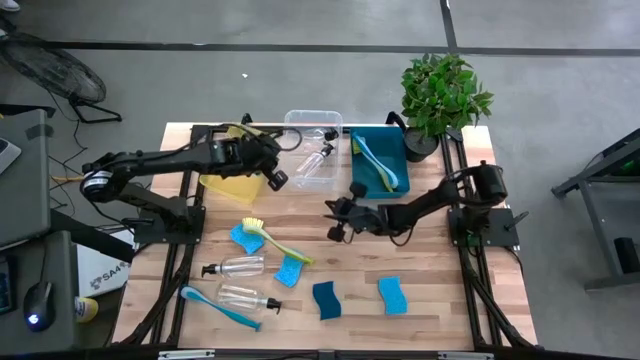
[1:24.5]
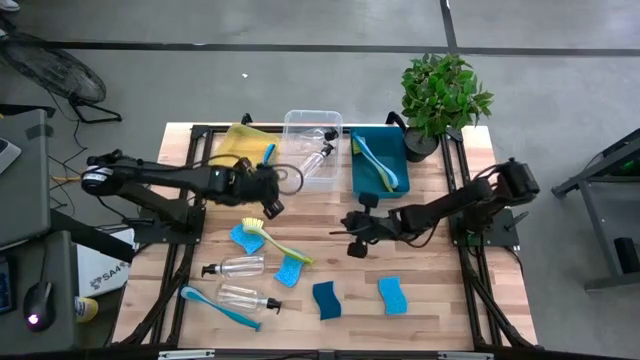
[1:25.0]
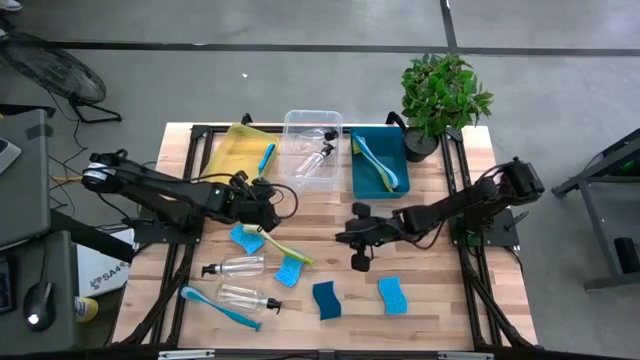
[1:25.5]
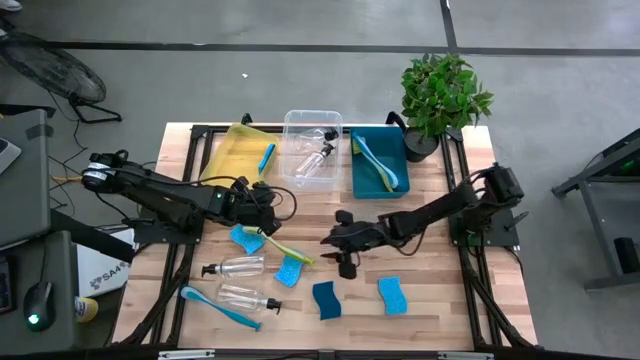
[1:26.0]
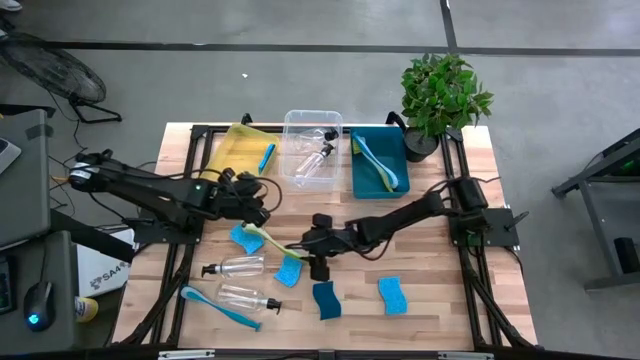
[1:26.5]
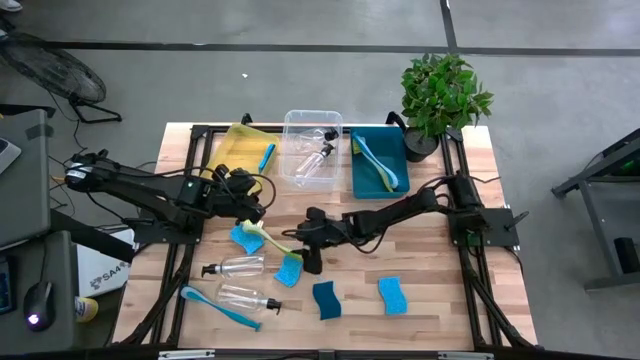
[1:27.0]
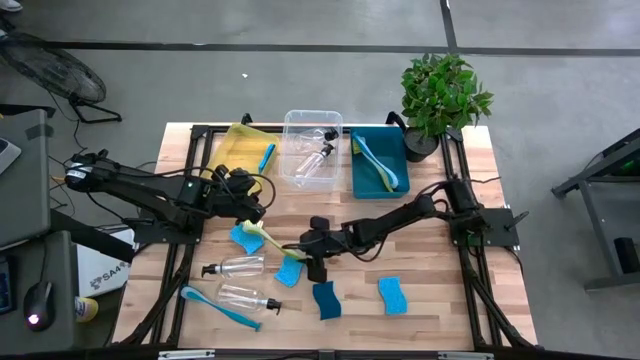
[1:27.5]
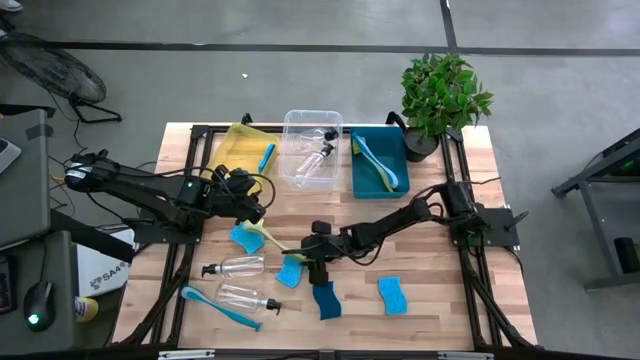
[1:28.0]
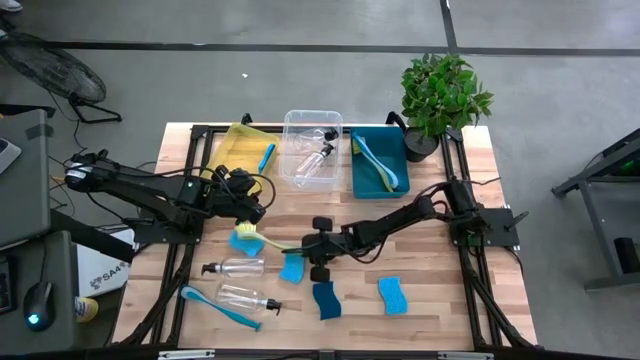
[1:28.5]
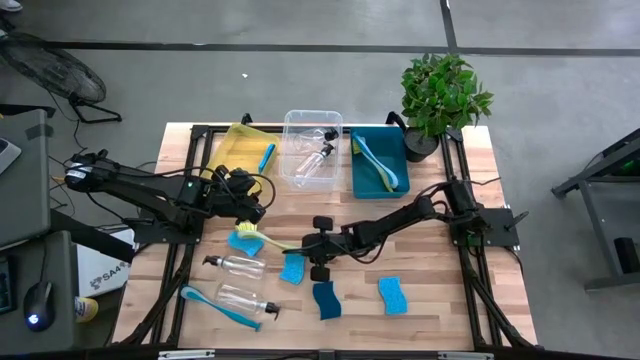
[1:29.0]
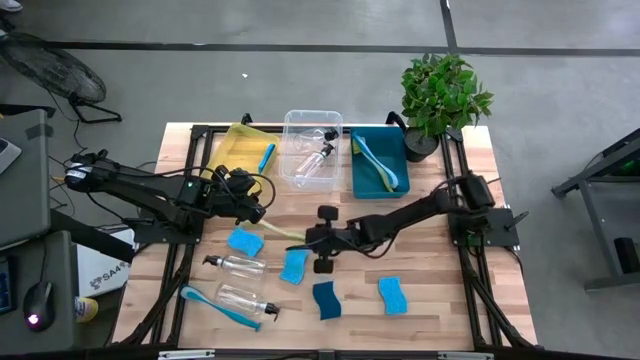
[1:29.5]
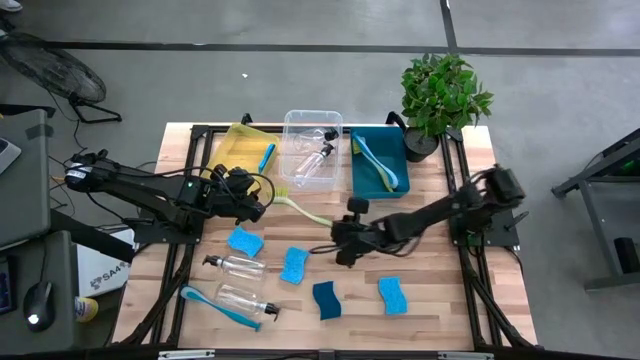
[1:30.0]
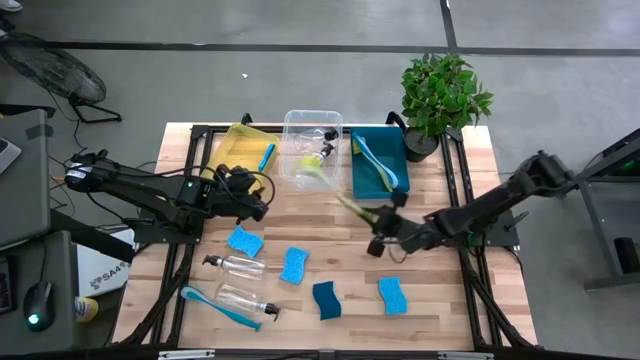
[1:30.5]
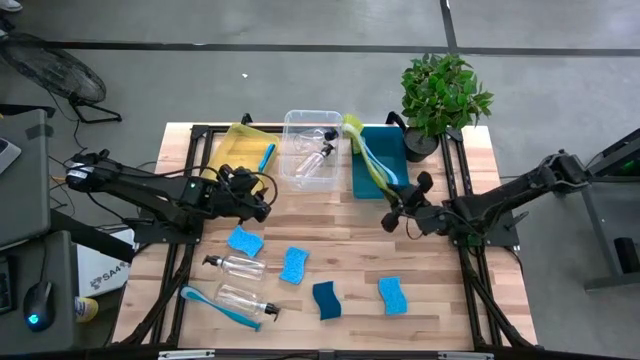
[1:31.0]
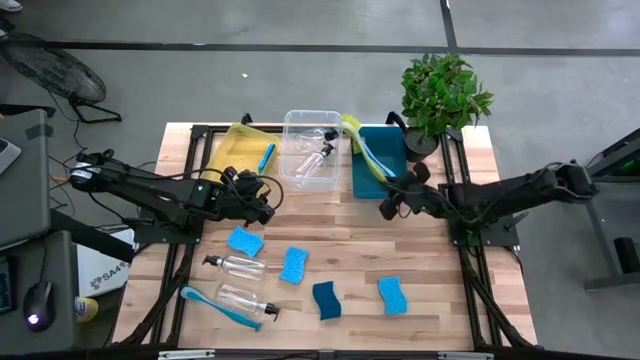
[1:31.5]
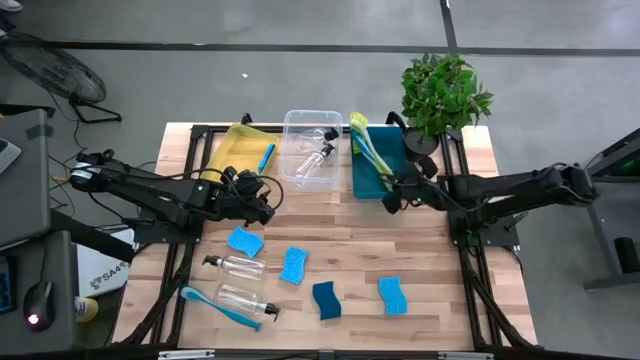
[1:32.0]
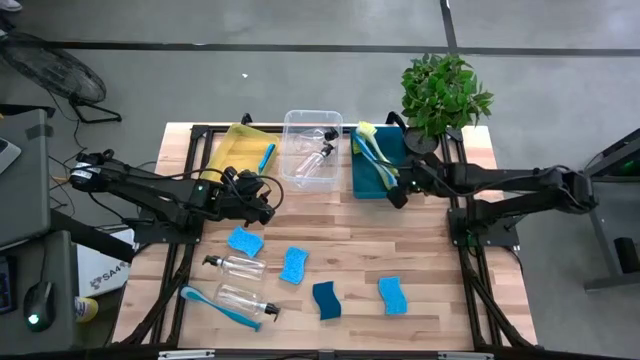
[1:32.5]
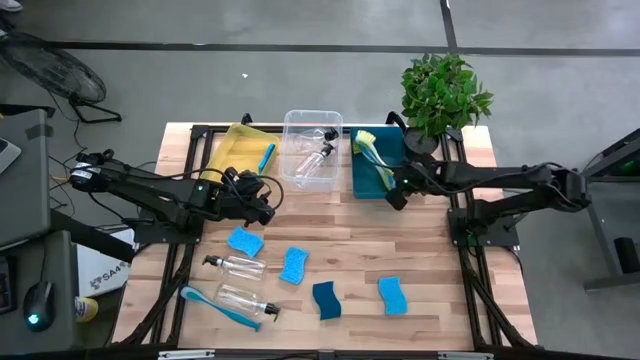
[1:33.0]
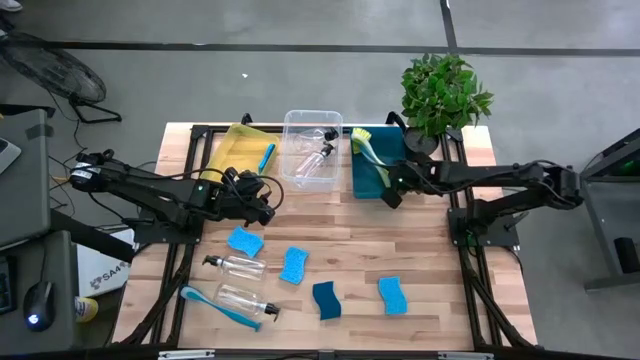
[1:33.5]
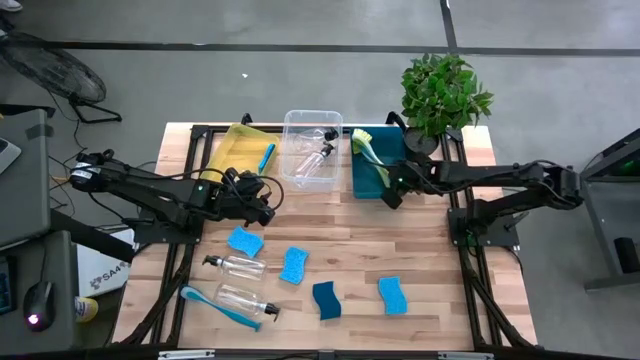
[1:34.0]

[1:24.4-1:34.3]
Task: Pick & Place Kitchen Sink Supplies
Put the yellow dish brush into the blue bin

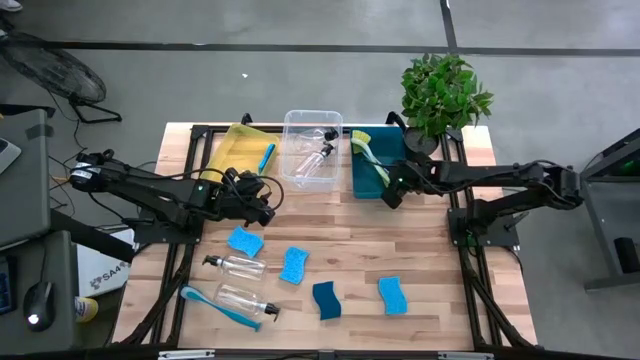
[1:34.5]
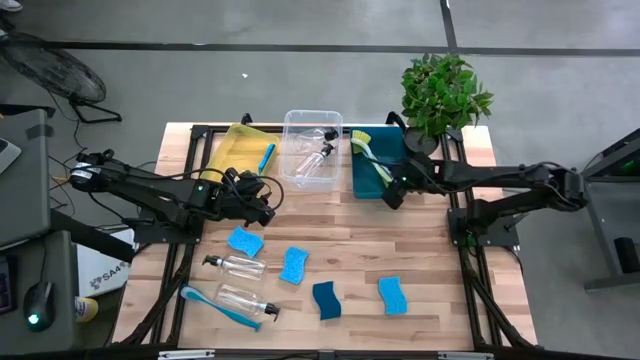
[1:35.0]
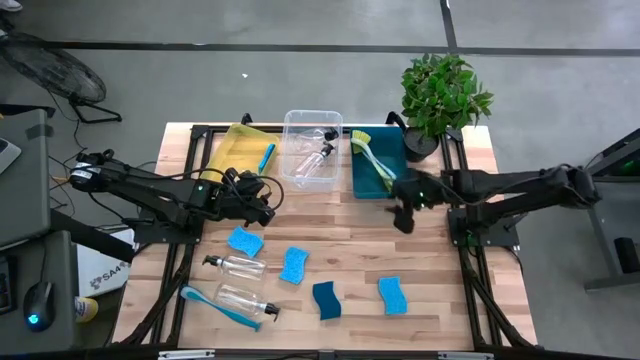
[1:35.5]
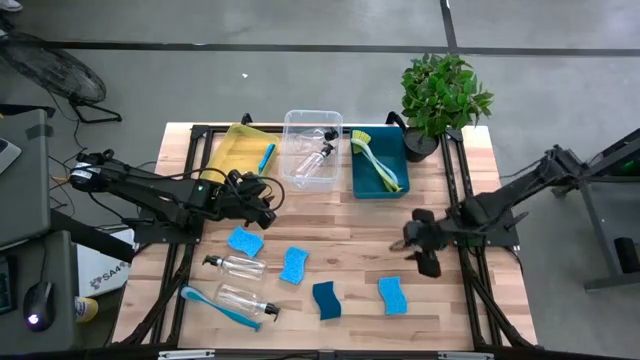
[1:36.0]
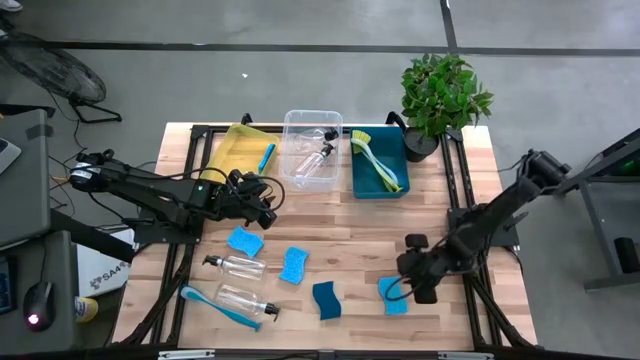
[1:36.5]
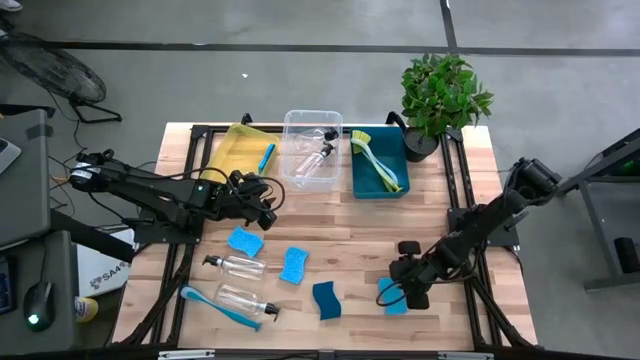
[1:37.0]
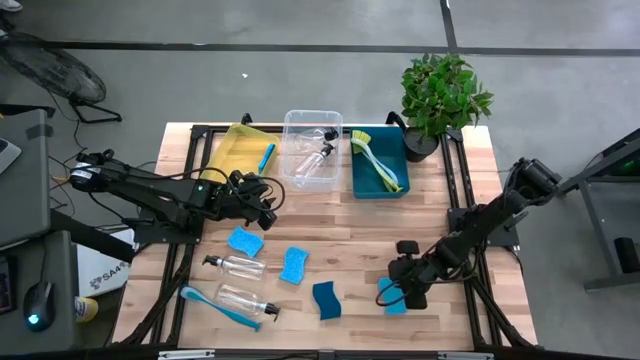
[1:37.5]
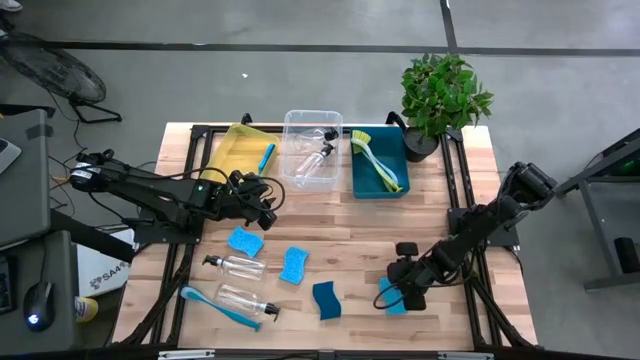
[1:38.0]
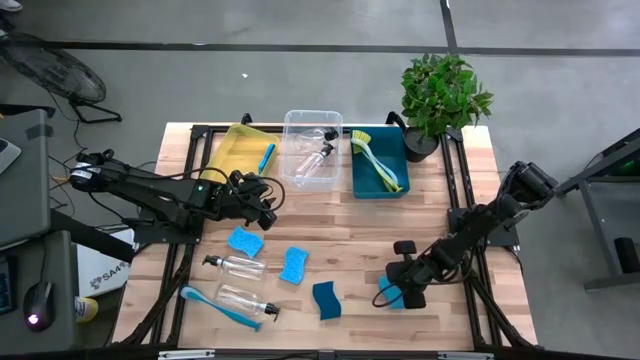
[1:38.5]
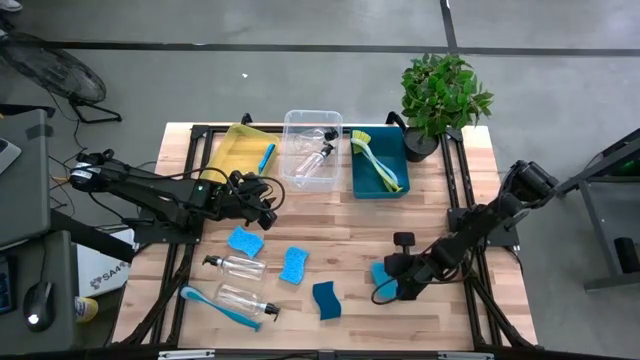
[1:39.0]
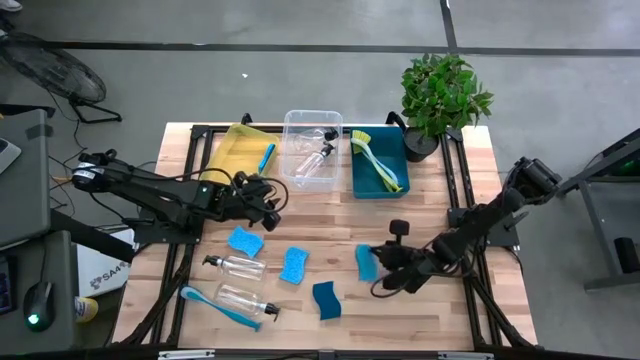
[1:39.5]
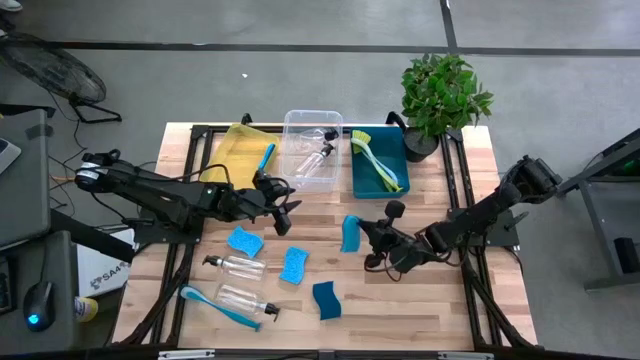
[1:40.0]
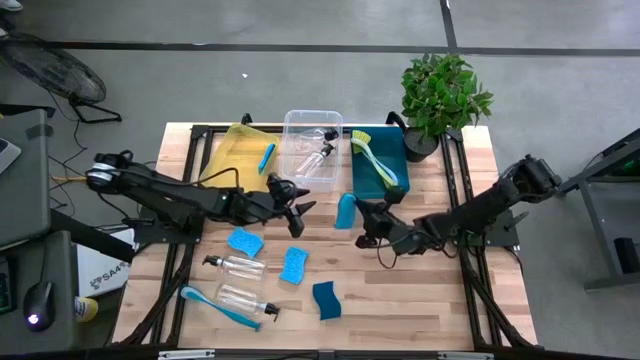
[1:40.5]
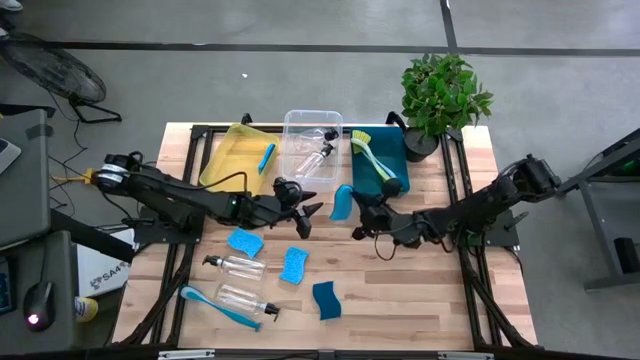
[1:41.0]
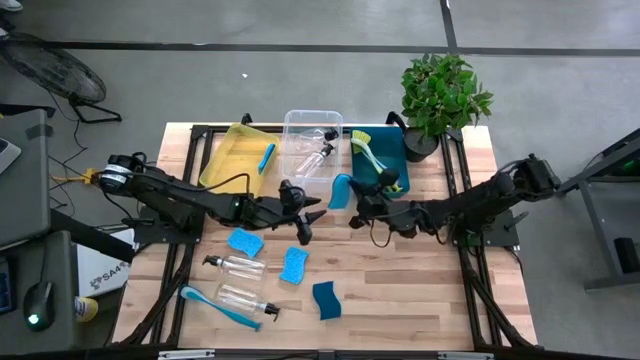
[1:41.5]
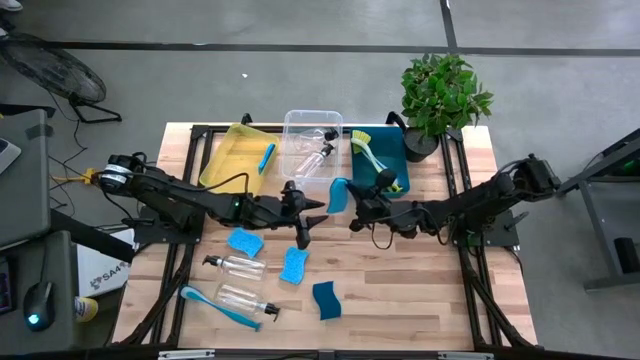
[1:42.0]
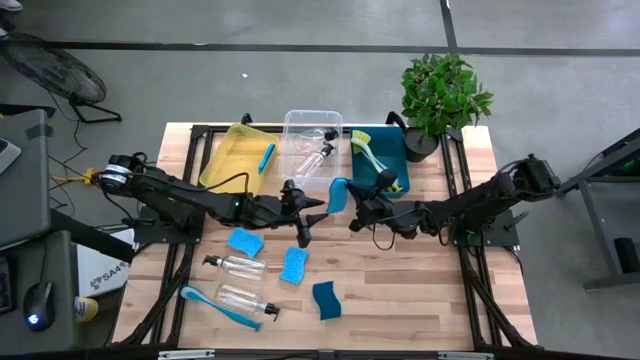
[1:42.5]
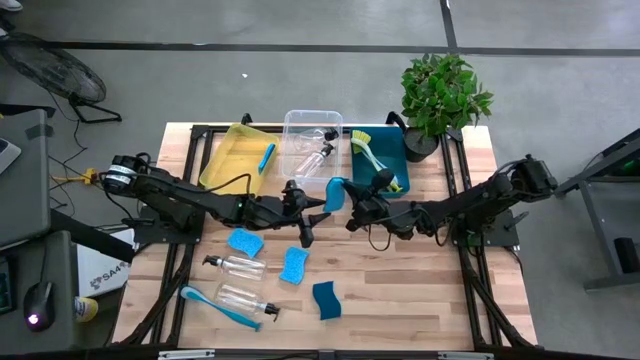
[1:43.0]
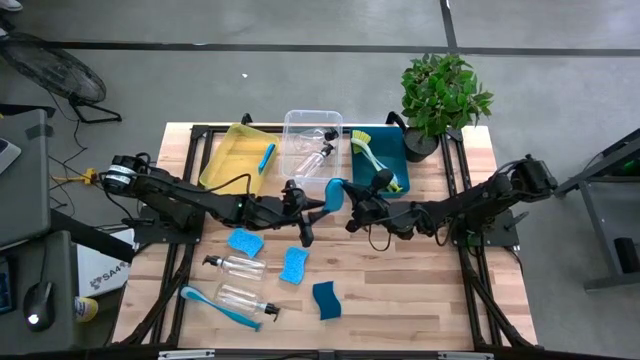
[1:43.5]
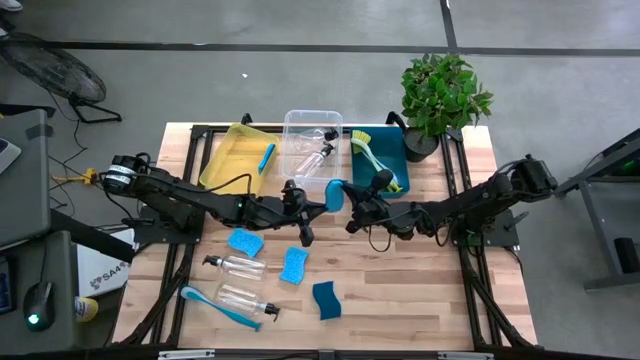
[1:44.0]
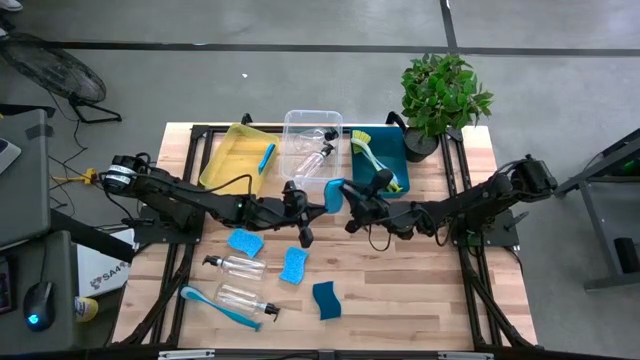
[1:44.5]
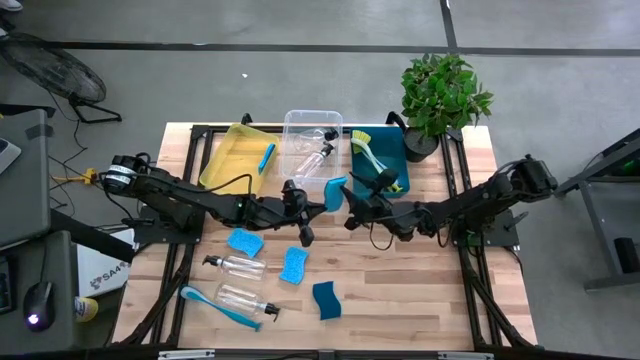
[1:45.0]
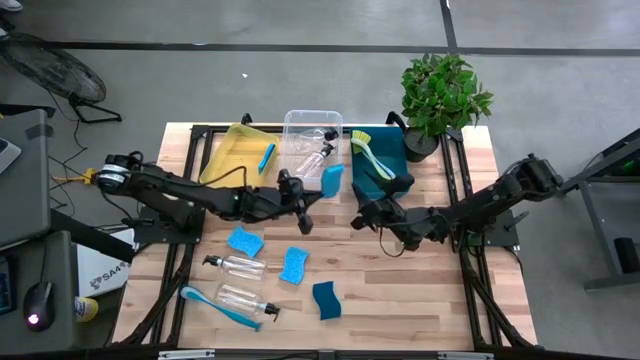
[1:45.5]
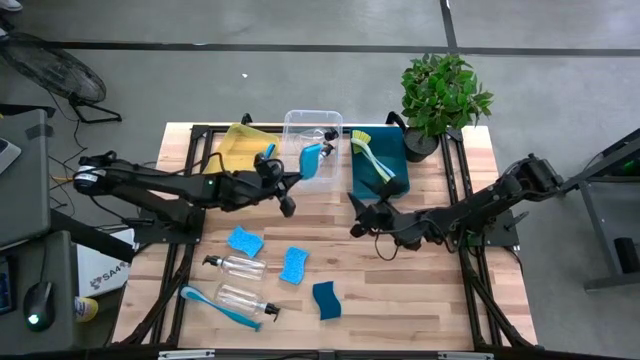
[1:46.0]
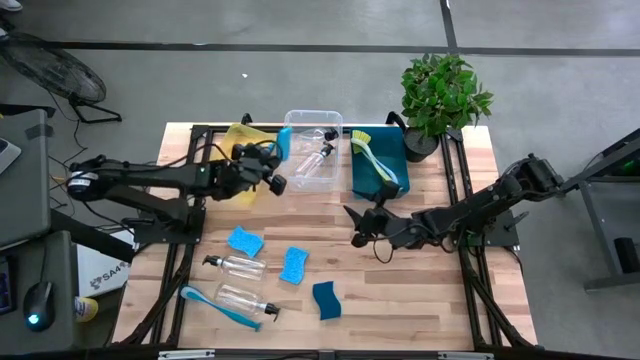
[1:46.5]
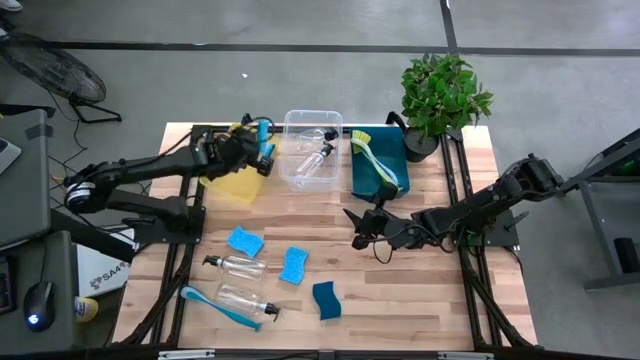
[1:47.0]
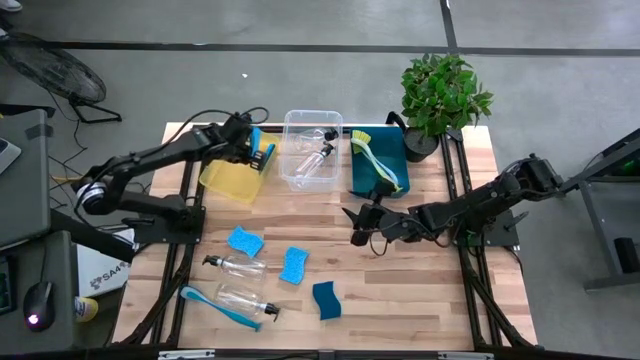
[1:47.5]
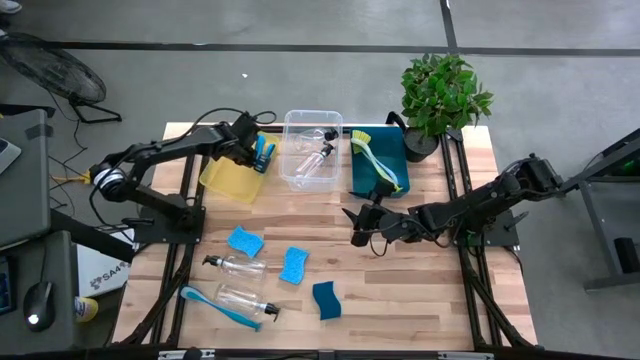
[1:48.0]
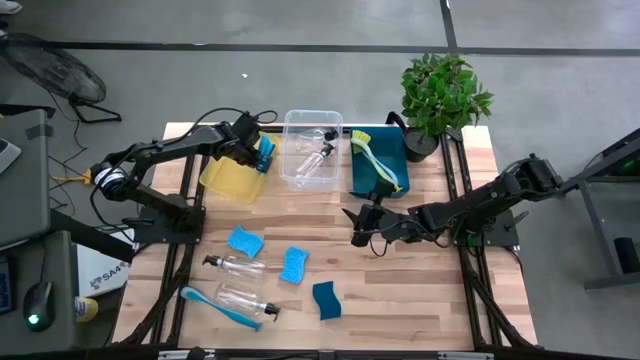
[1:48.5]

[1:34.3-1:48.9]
Put the blue sponge into the yellow bin
